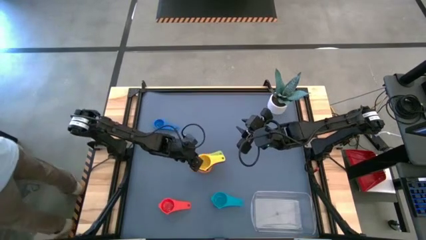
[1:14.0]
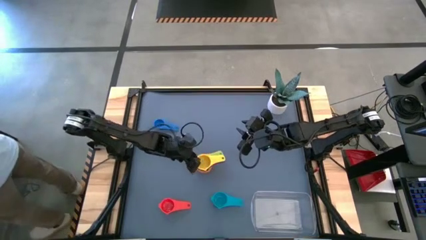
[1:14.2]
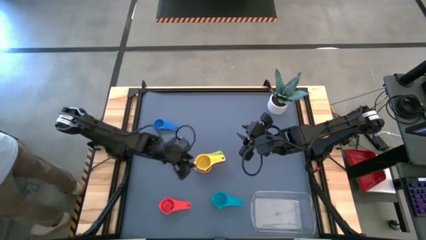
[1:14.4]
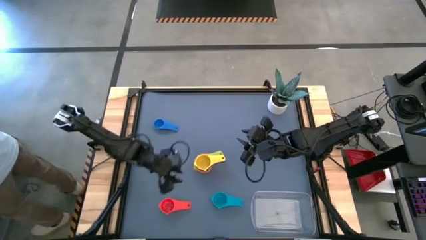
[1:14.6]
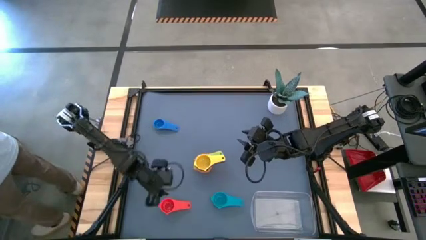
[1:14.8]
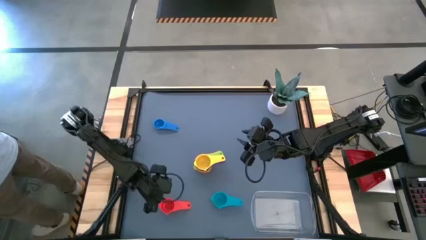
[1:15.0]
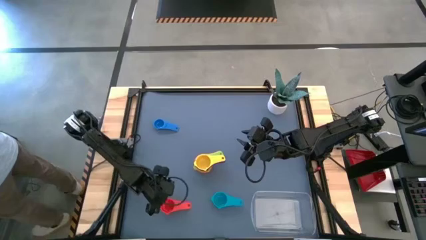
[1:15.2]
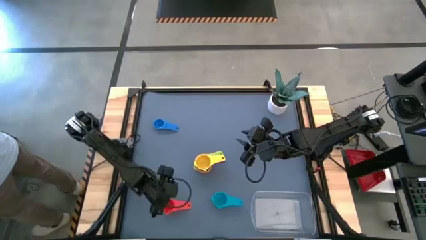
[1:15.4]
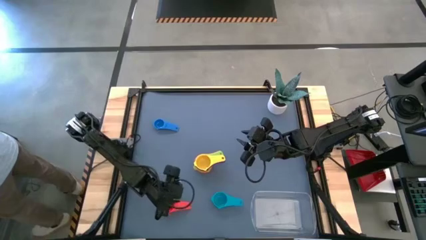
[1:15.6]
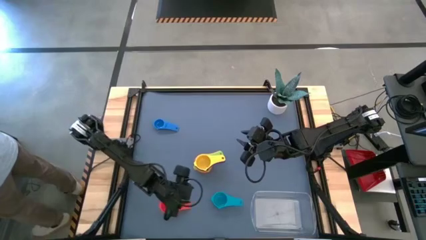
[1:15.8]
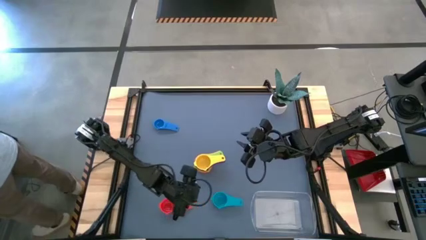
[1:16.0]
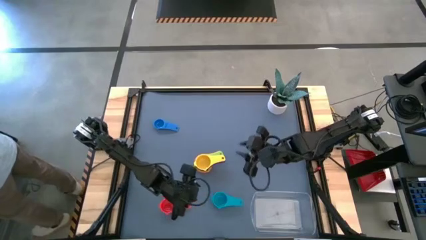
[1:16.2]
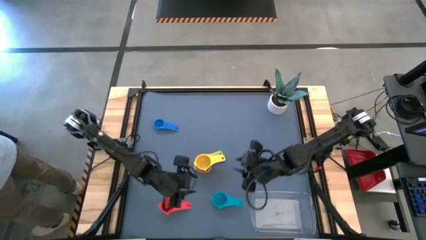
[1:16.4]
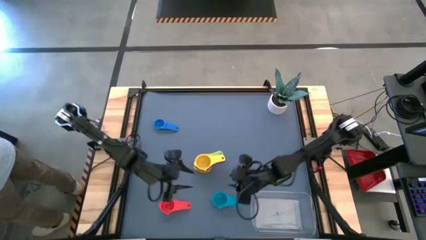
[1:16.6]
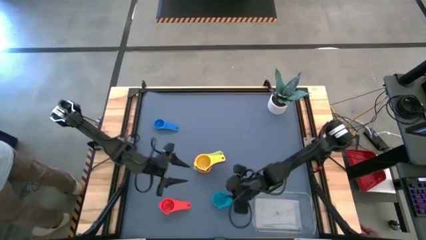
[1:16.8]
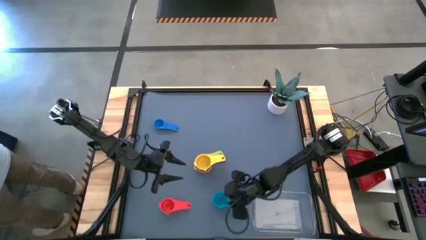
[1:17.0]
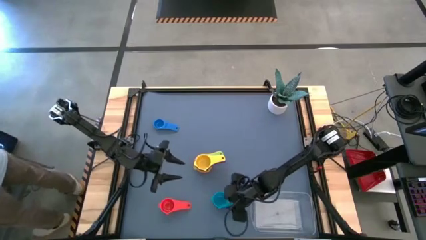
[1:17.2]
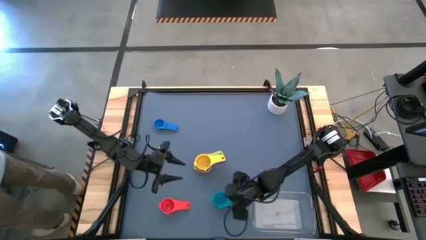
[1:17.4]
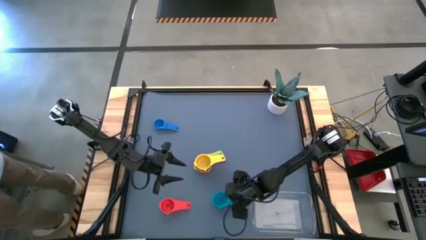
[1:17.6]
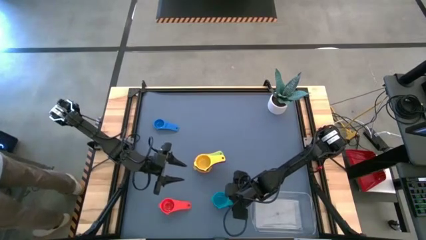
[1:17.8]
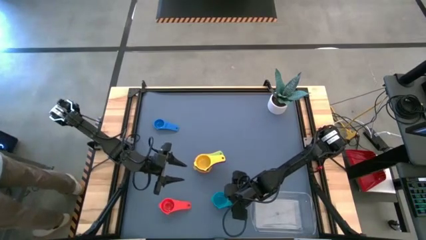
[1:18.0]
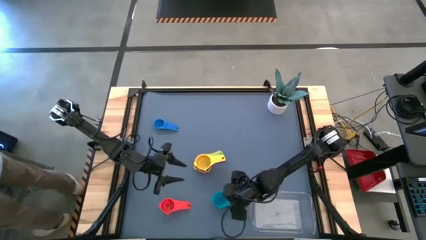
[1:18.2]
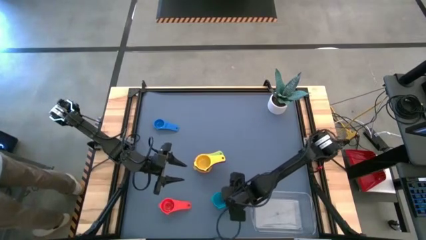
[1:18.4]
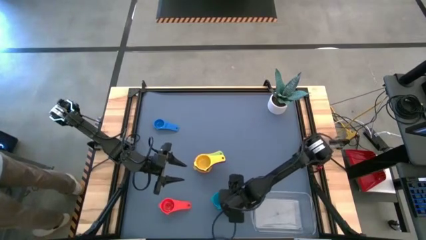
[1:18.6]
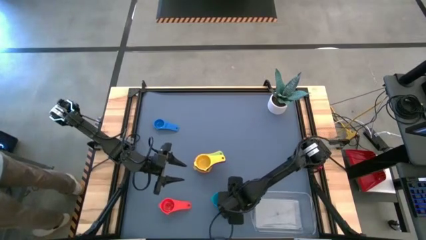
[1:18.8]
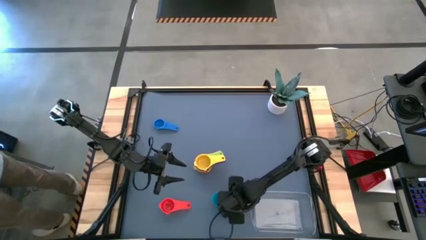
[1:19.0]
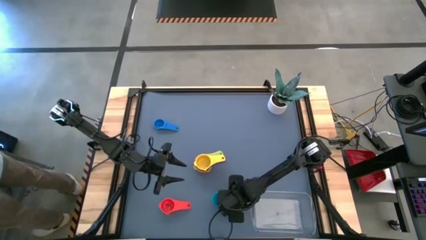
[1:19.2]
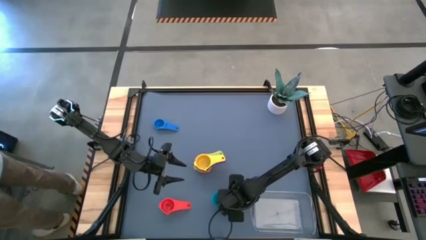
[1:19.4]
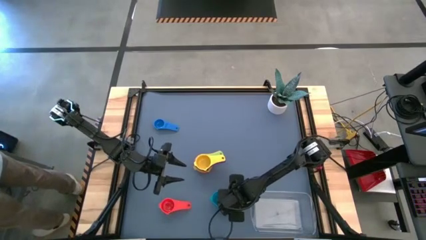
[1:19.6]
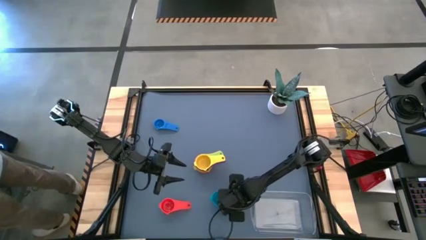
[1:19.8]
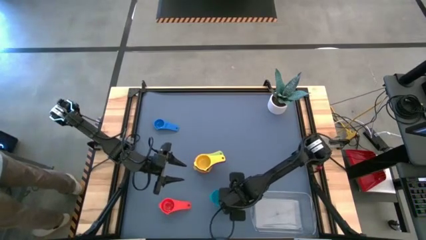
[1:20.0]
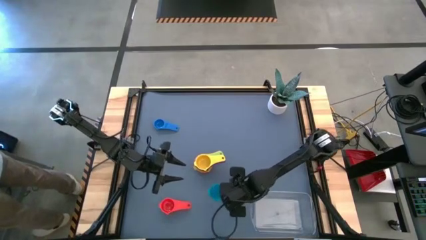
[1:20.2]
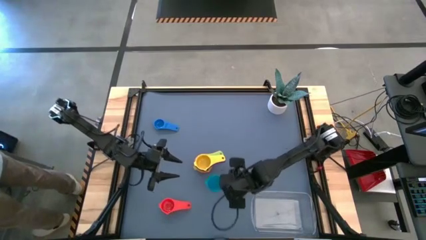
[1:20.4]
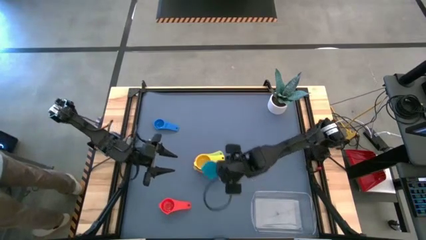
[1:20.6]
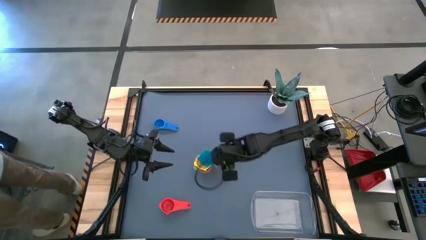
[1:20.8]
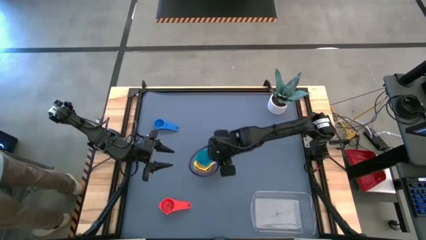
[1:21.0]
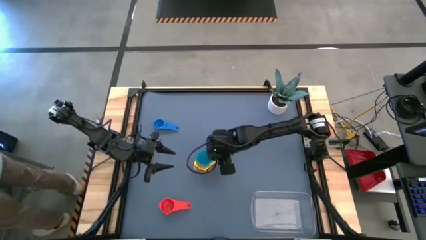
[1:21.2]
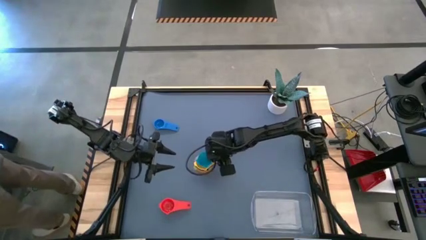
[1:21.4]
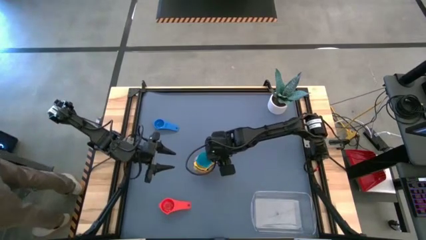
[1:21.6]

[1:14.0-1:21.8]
Task: Nest measuring cups in basket
Stack the light blue measuring cup on top of the yellow measuring cup

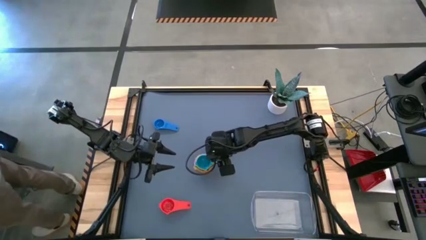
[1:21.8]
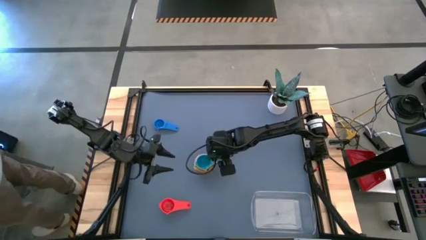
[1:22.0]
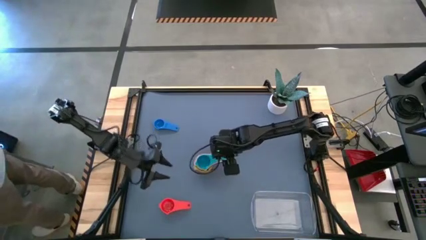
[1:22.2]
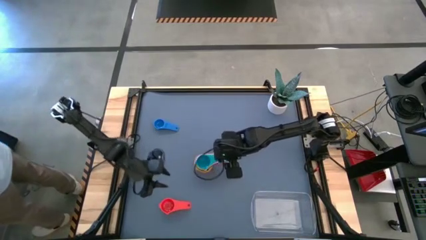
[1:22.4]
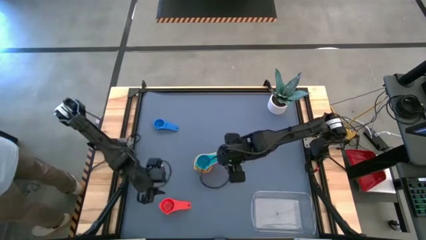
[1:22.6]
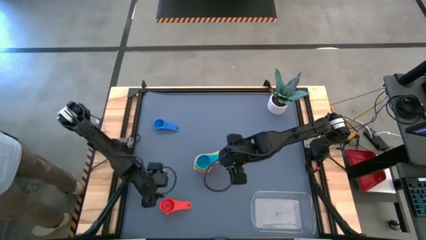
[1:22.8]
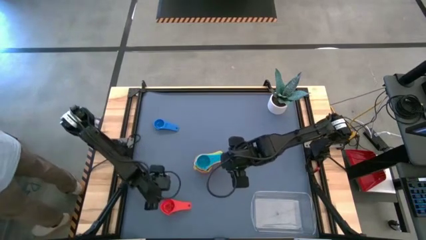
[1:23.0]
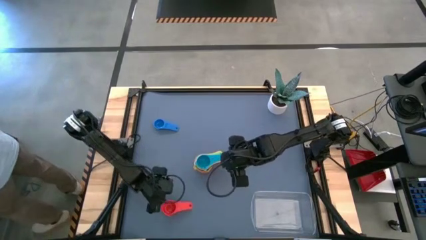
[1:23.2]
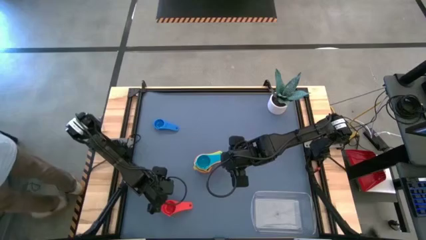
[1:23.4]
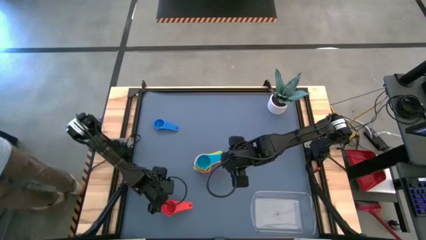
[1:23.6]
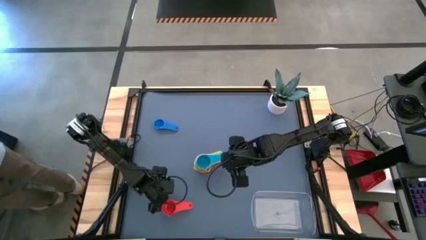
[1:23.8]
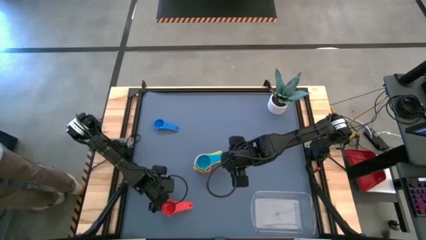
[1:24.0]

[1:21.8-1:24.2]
Stack the red measuring cup on top of the light blue measuring cup

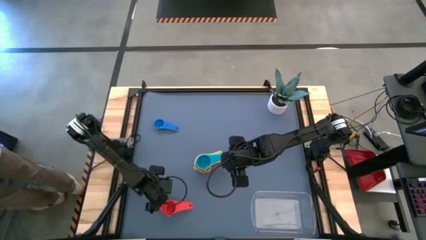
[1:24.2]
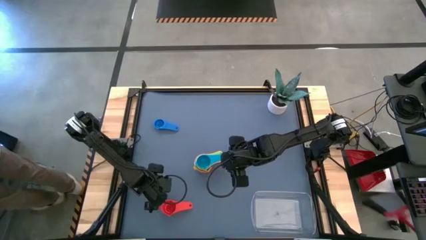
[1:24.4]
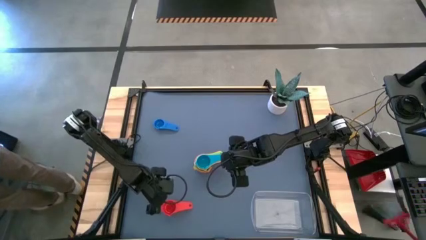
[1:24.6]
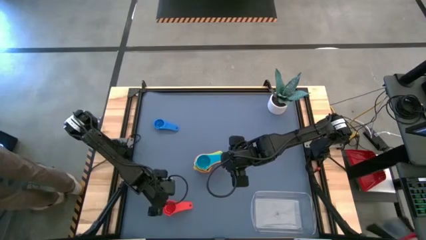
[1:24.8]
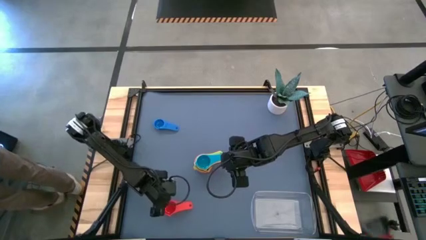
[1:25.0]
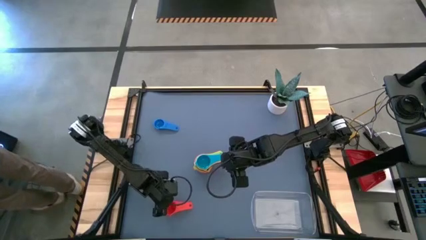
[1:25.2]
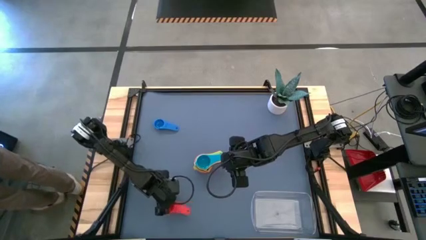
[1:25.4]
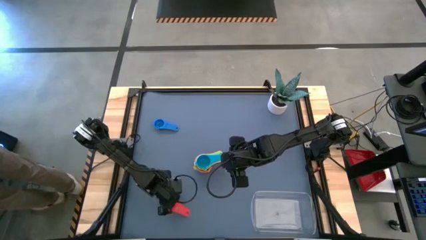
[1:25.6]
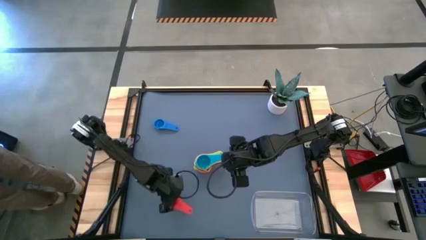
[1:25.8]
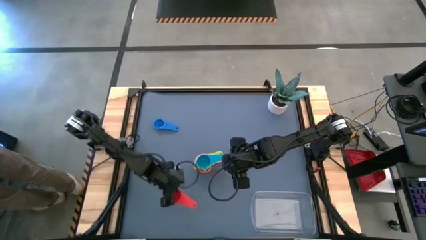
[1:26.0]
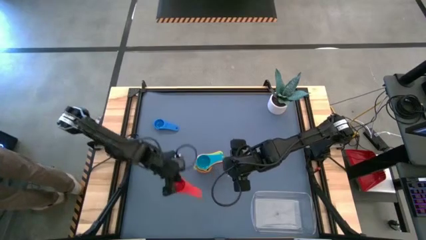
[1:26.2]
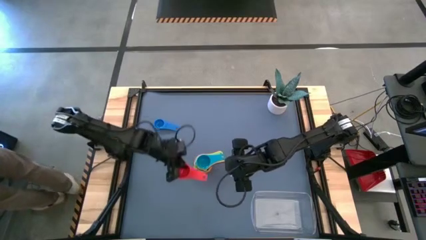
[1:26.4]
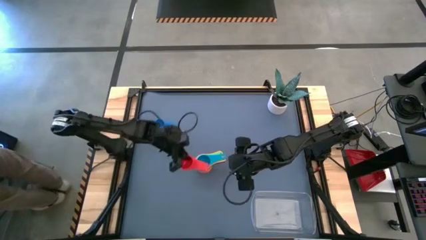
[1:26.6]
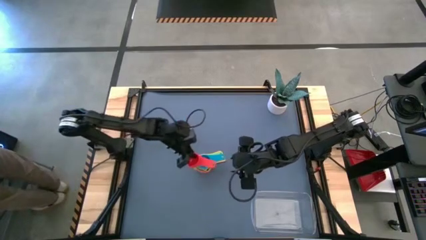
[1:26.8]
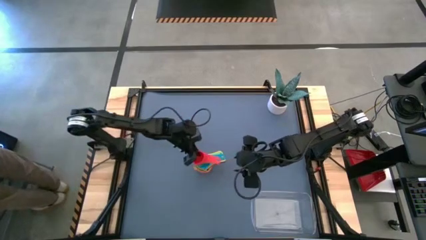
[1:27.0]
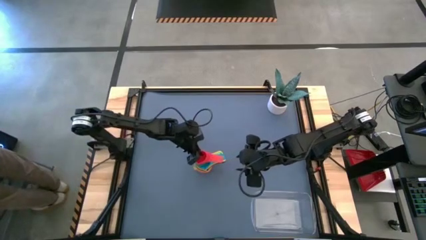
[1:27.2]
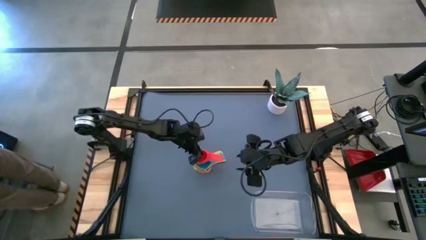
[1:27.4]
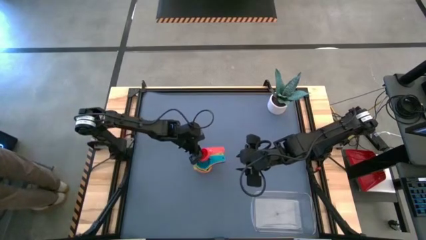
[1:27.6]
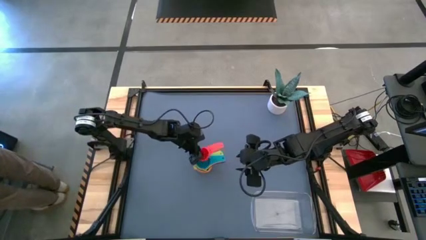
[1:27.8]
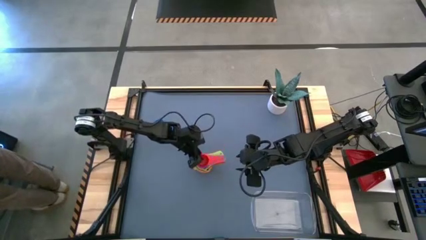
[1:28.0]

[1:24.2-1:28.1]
Stack the red measuring cup on top of the light blue measuring cup

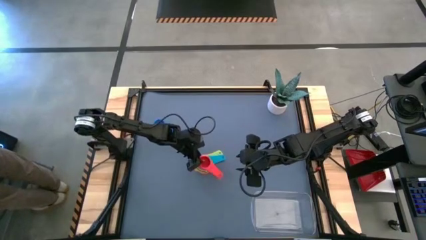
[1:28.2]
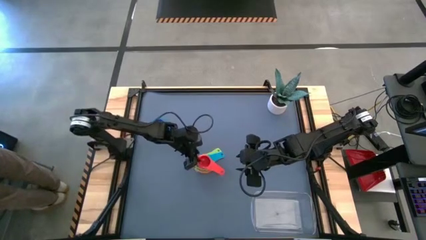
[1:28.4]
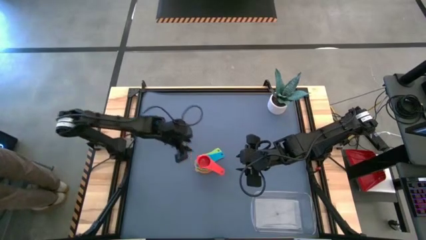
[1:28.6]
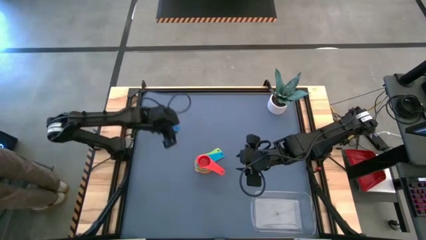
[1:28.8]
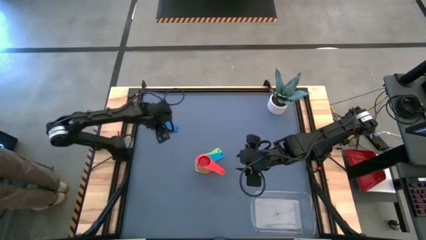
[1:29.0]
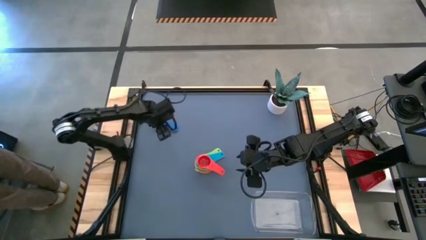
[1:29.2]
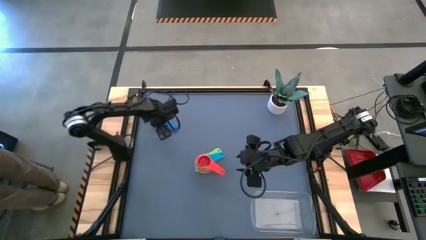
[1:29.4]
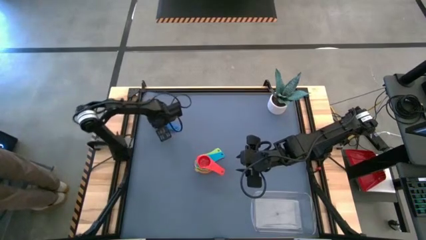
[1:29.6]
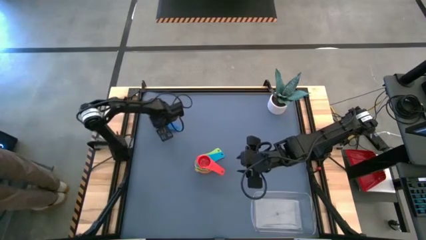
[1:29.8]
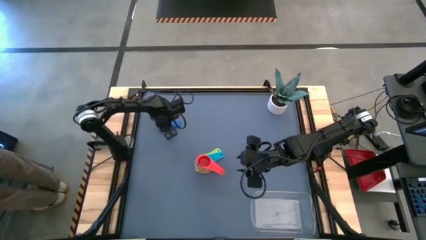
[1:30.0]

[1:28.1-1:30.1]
Stack the blue measuring cup on top of the red measuring cup
